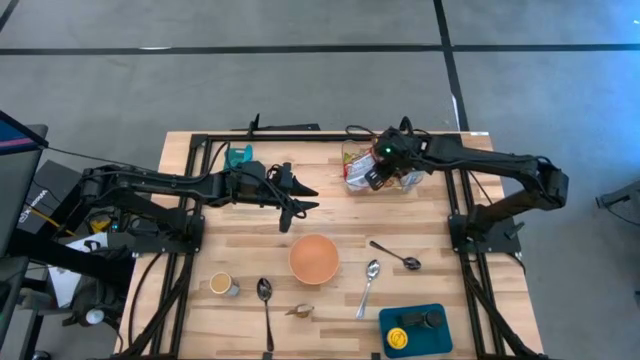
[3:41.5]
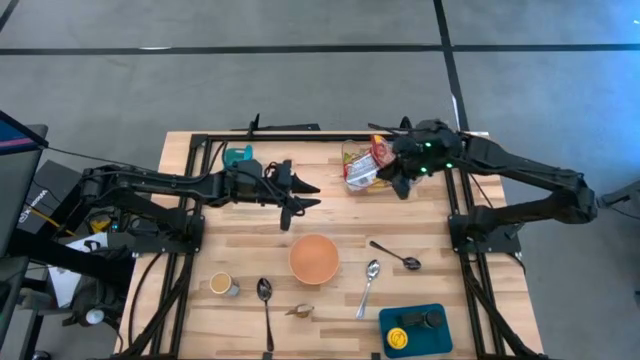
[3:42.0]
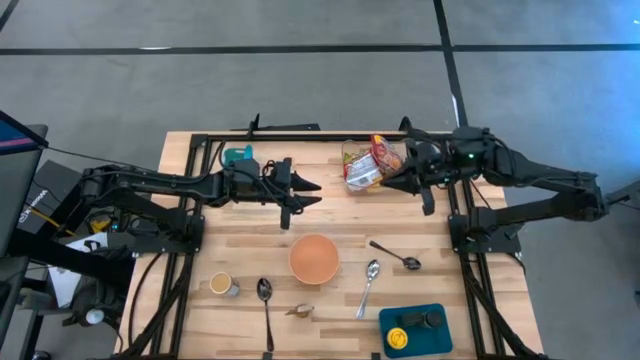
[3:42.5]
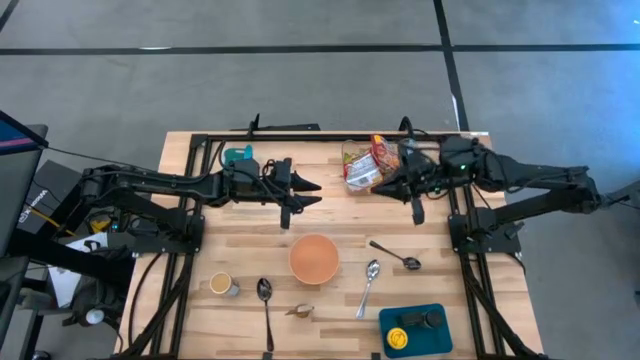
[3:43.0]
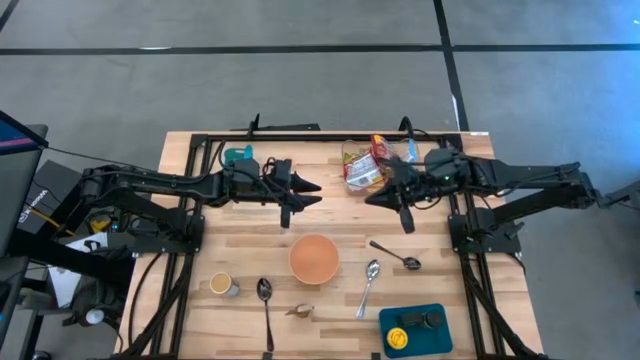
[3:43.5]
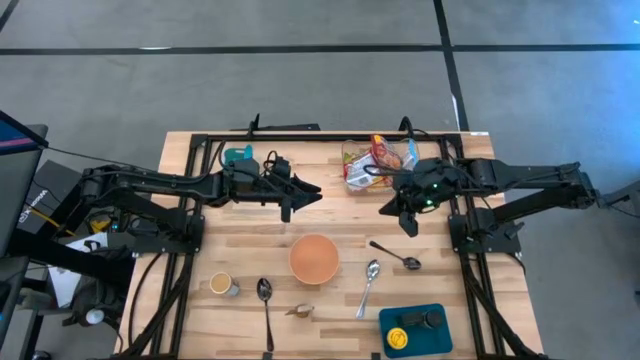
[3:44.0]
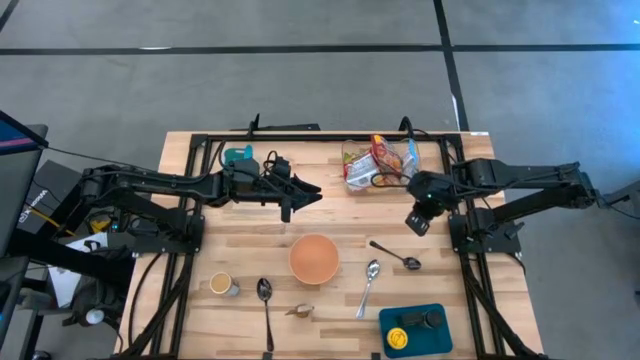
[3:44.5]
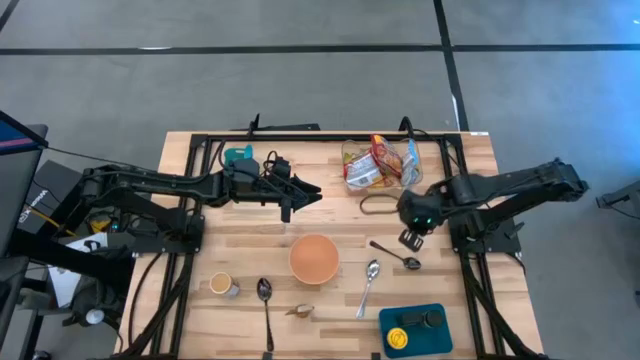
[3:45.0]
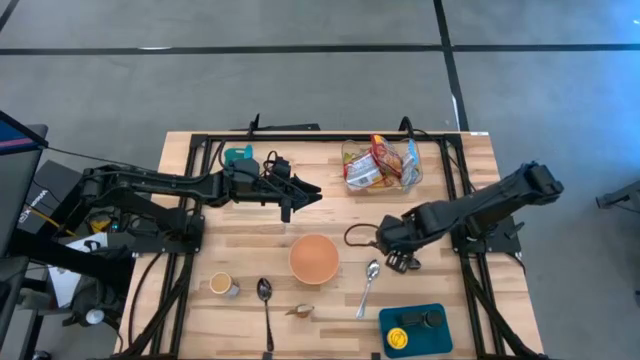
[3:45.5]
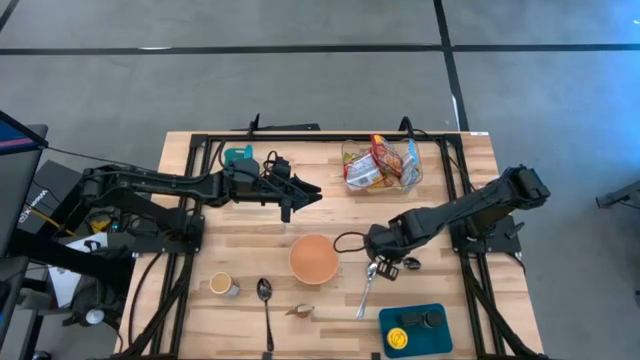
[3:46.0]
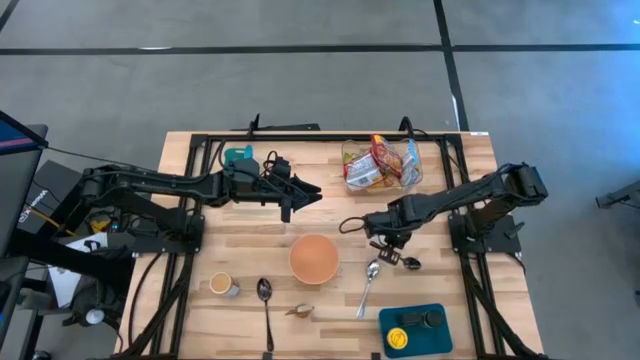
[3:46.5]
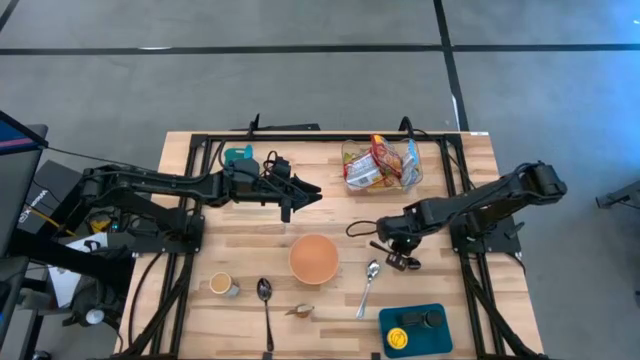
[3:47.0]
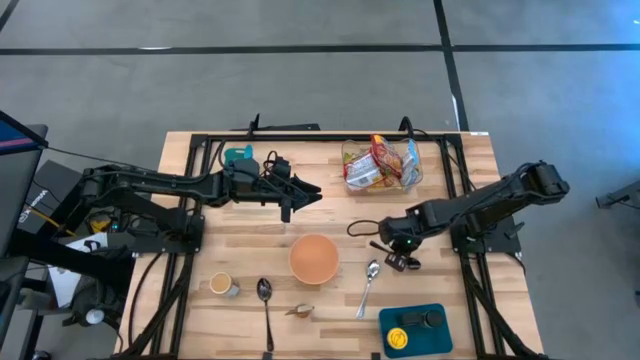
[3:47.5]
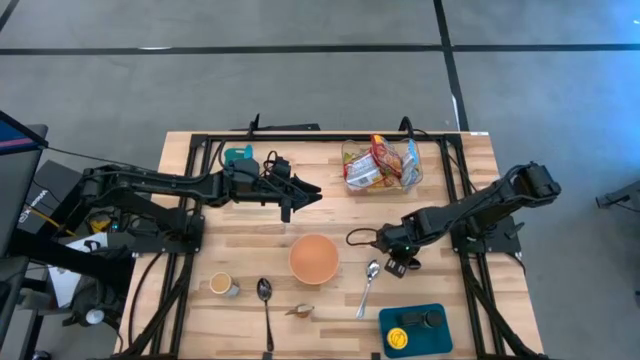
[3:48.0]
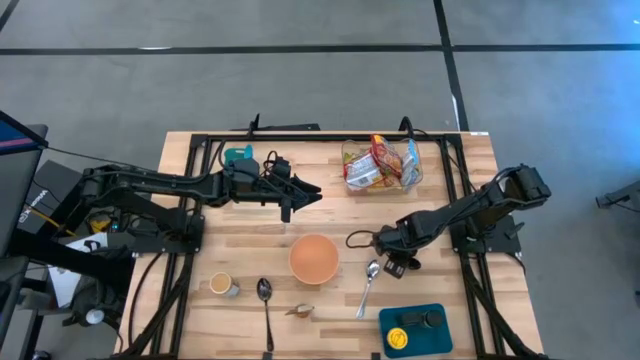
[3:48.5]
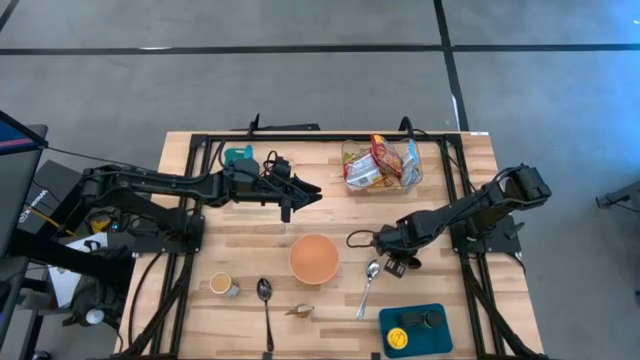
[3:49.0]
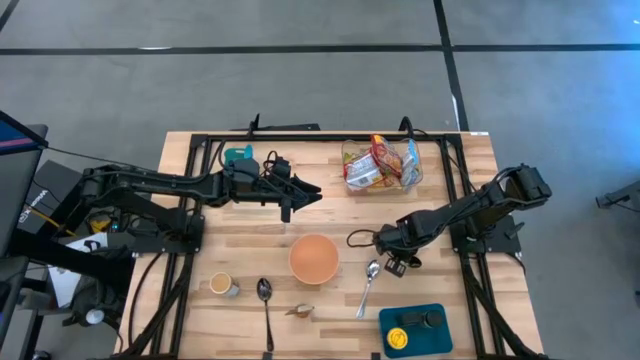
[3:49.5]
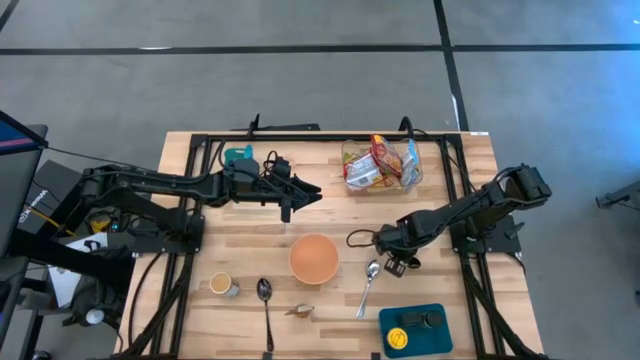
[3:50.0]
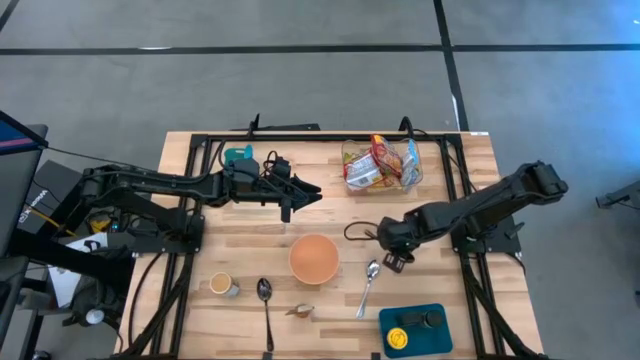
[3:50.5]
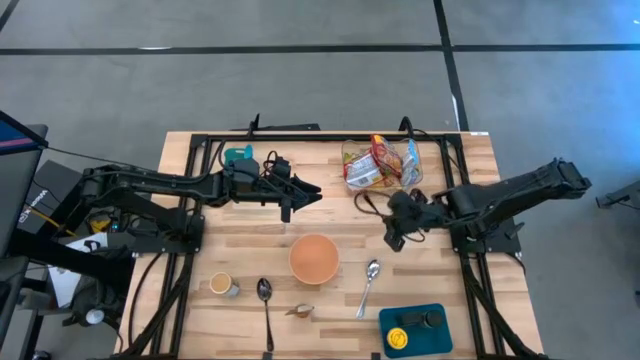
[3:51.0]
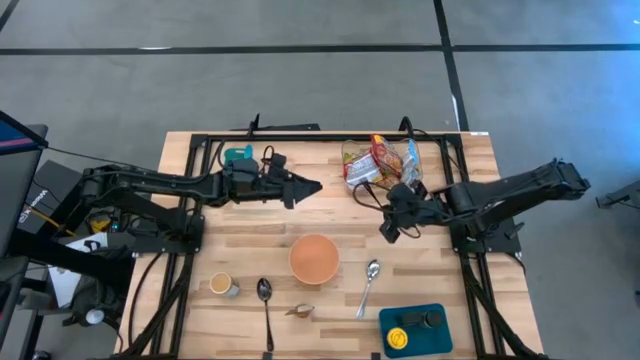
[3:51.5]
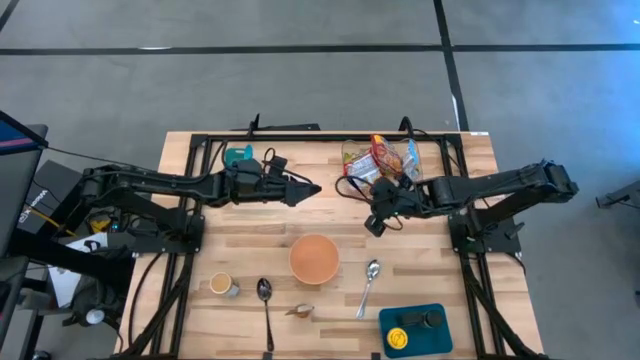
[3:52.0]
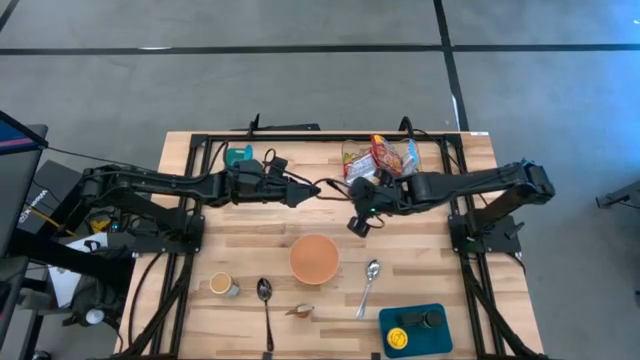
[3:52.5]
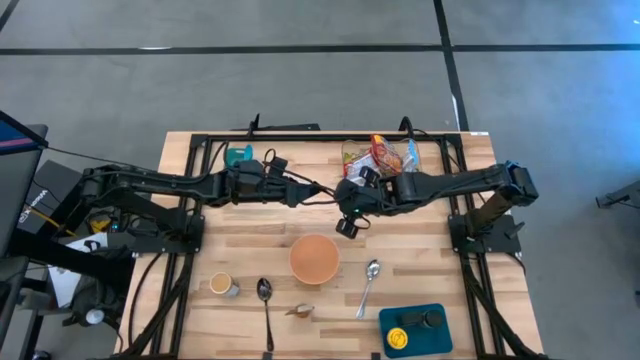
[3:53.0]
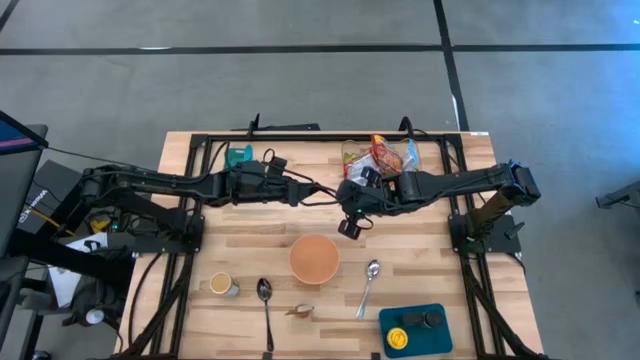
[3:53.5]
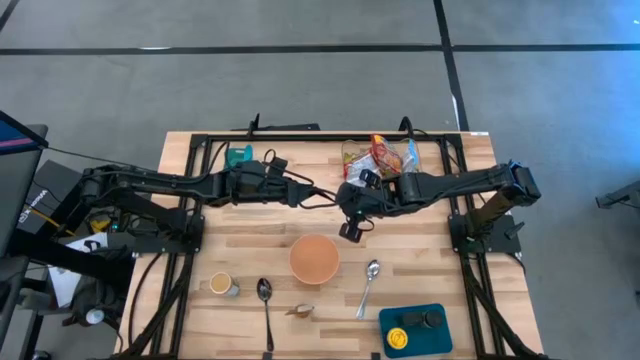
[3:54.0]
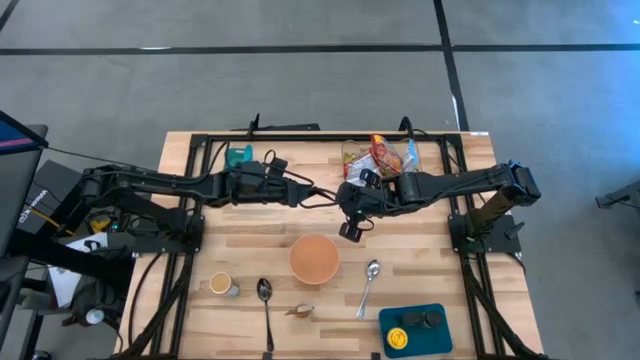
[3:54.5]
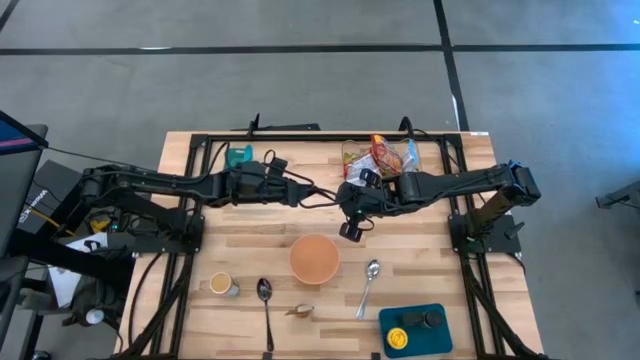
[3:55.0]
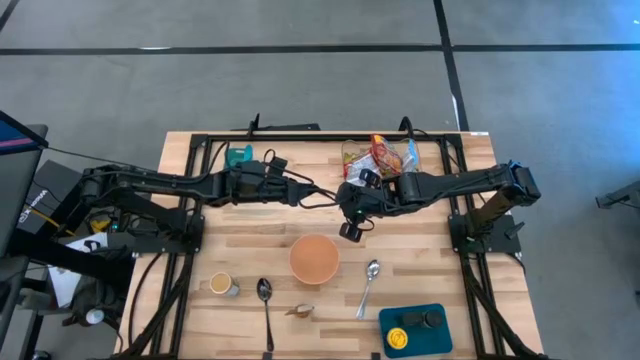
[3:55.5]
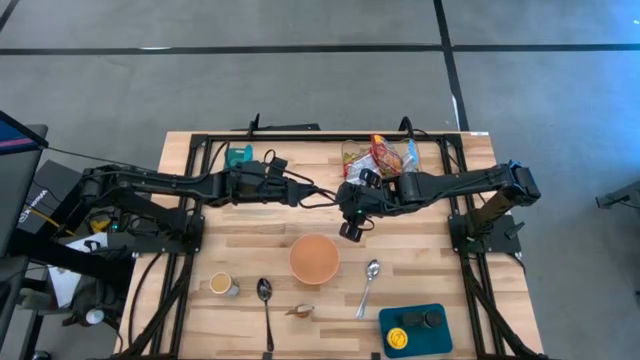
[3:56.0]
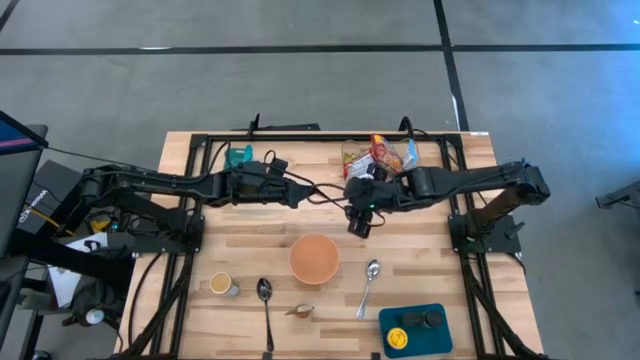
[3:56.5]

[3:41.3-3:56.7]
Task: Pick & Place Food Item
Put the top black spoon into the light green bin

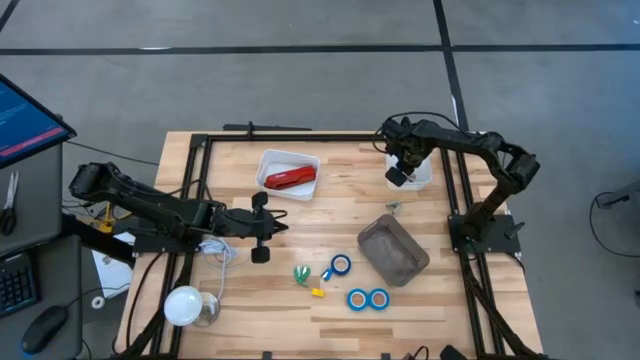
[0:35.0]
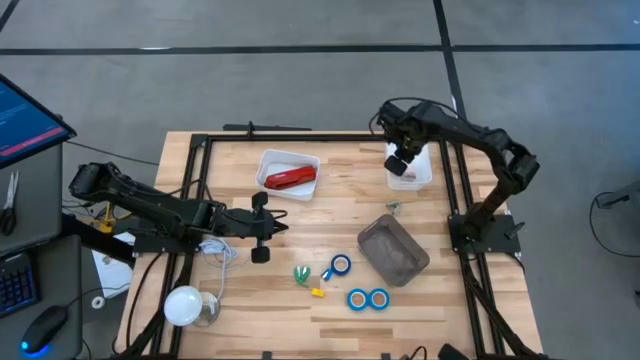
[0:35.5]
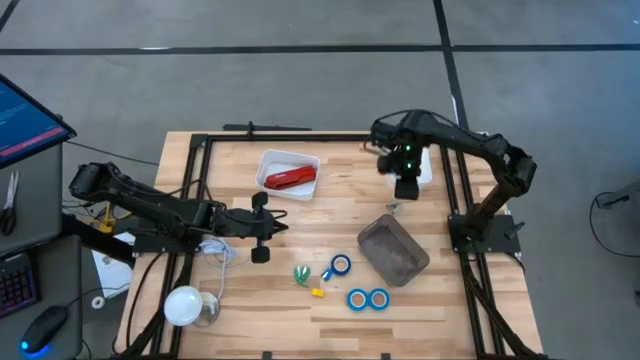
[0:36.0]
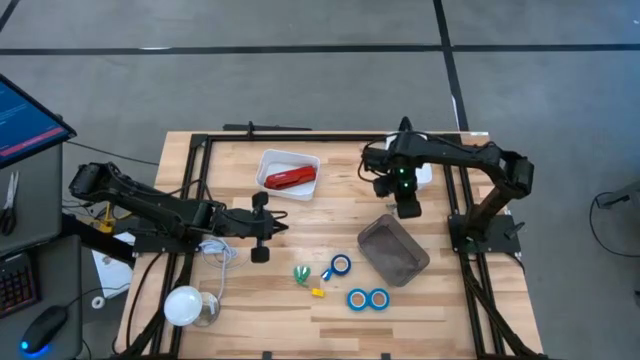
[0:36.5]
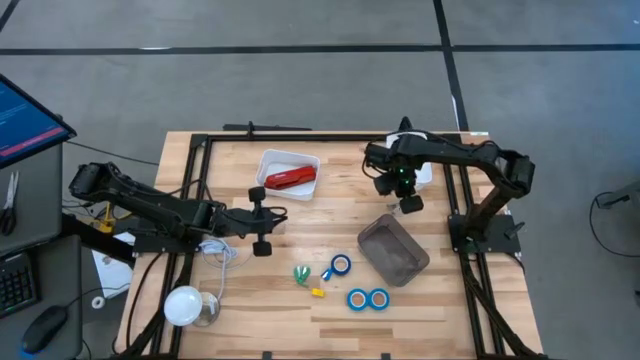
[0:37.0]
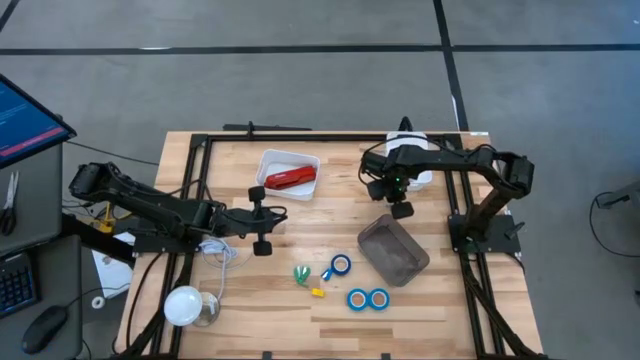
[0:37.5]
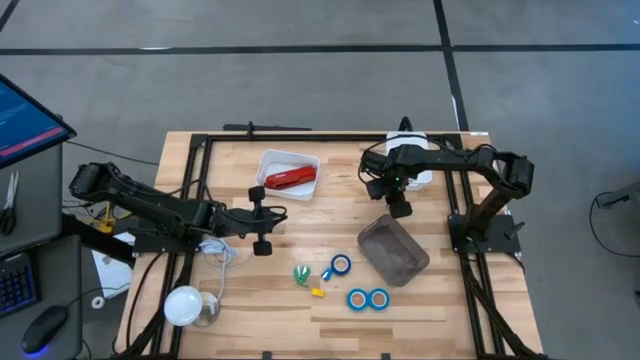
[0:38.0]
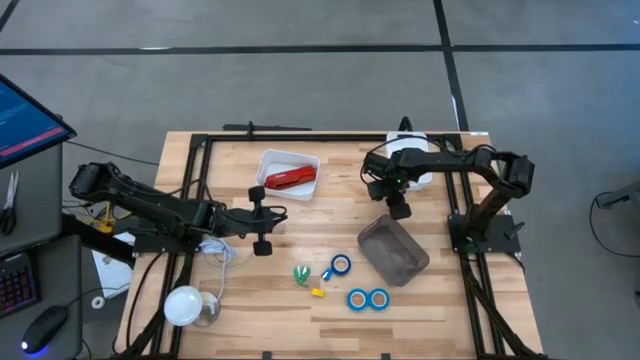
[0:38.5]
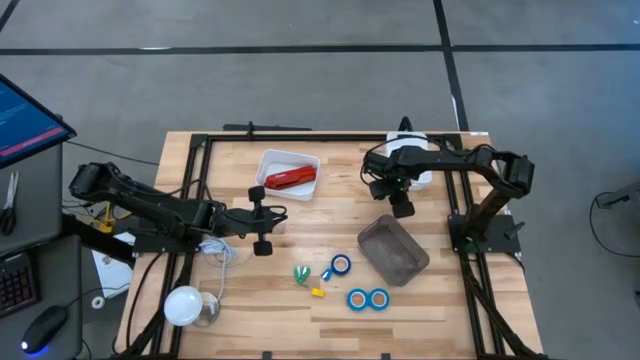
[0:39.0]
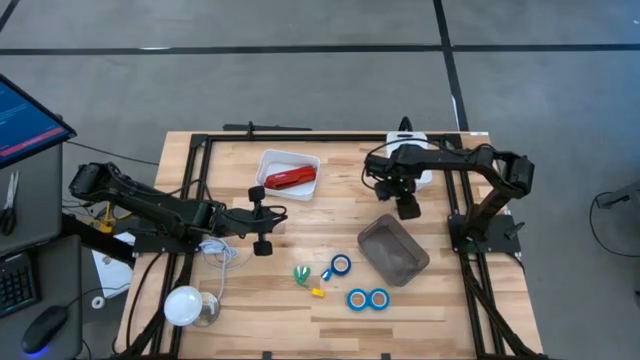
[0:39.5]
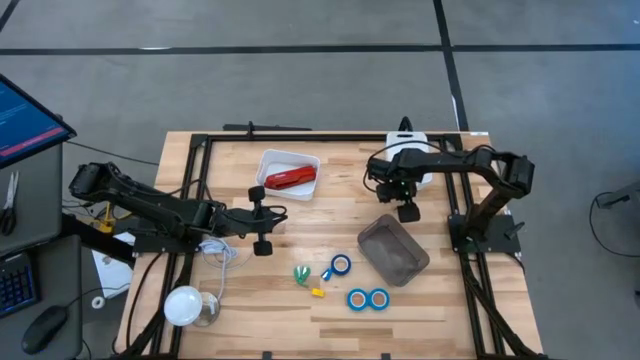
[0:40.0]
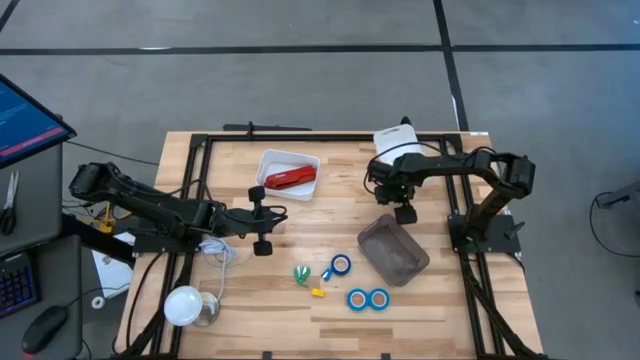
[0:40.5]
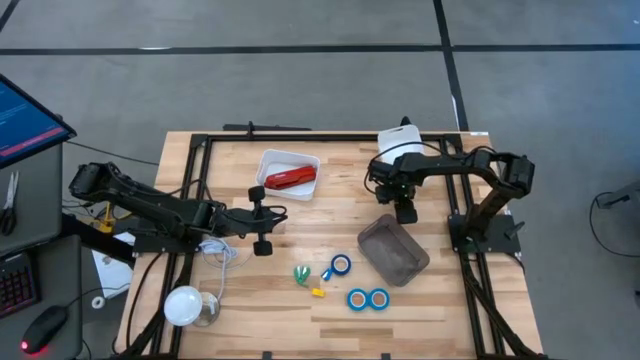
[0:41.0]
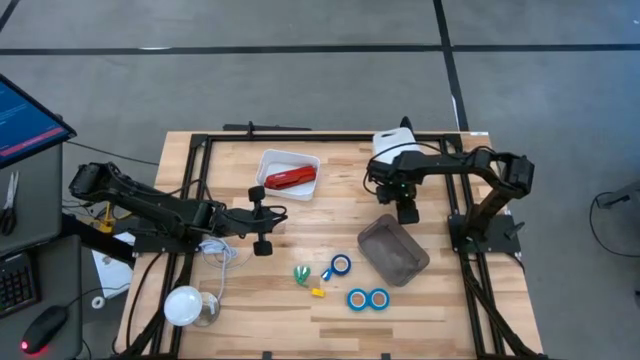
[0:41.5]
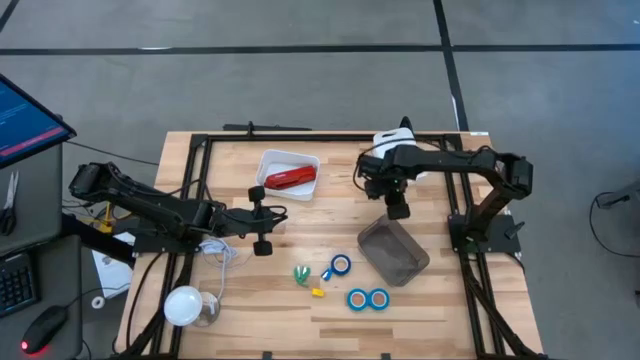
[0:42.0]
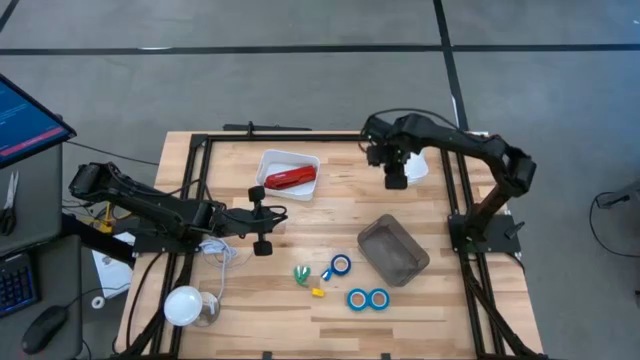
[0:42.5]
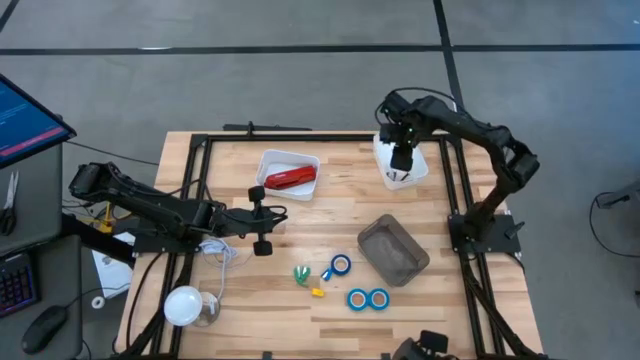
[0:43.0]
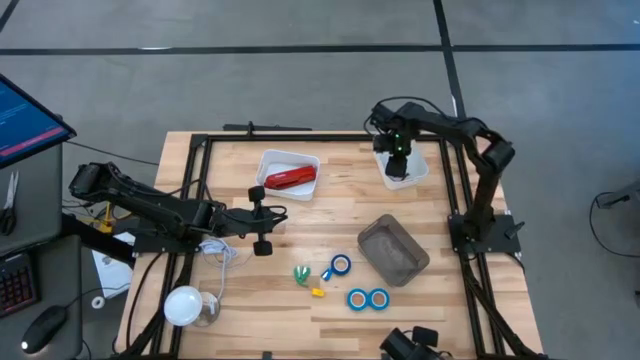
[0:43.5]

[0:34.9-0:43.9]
Task: Pick and place Stapler, Stapler remover, tape
Put the gray staple remover into the right white bin
